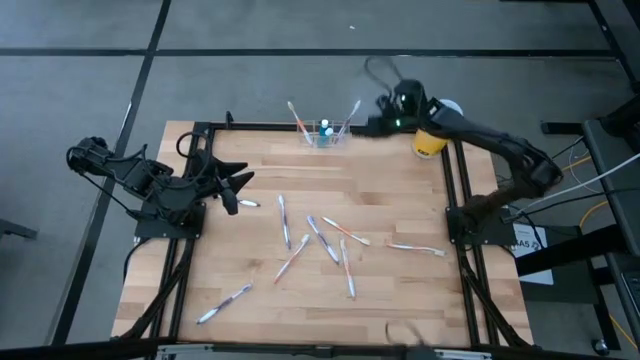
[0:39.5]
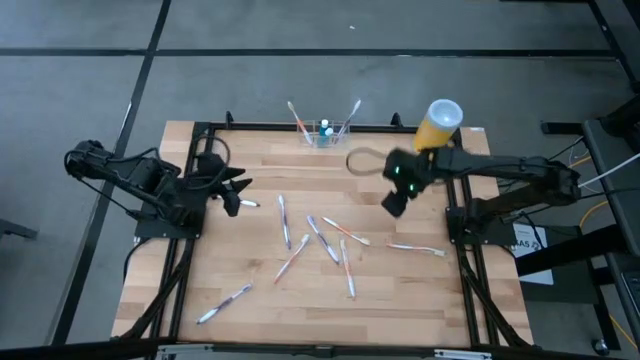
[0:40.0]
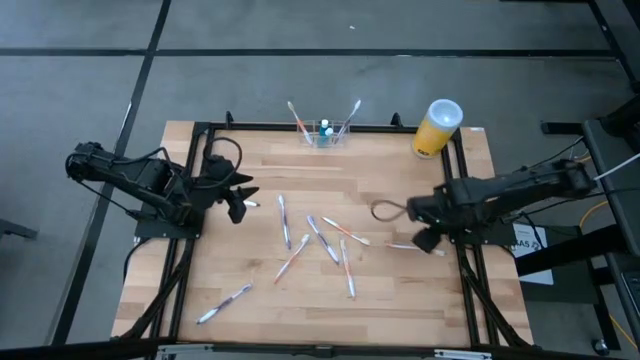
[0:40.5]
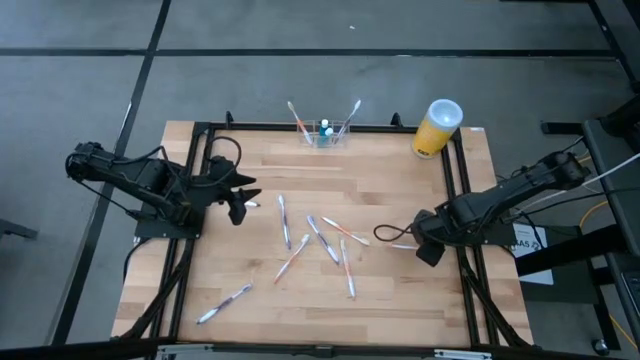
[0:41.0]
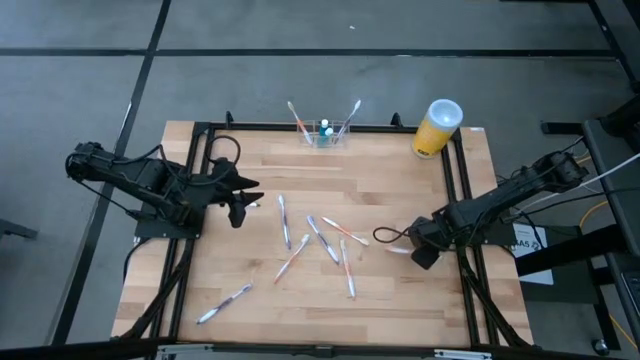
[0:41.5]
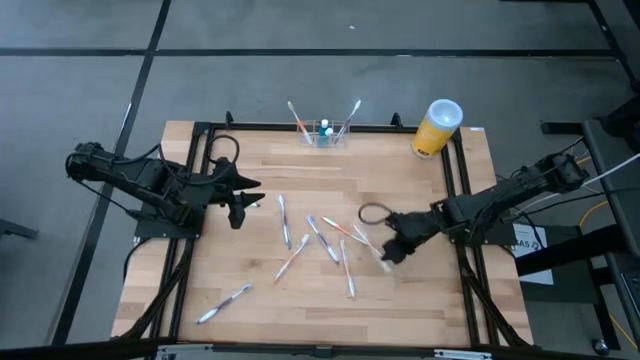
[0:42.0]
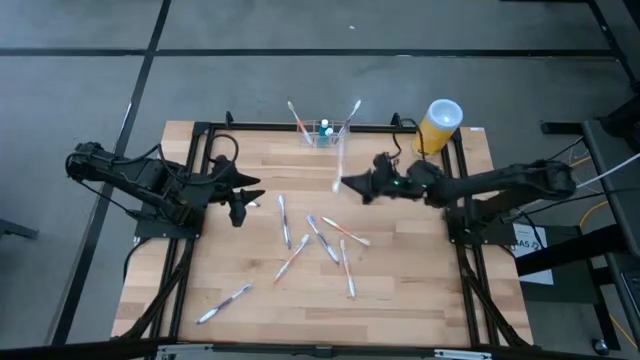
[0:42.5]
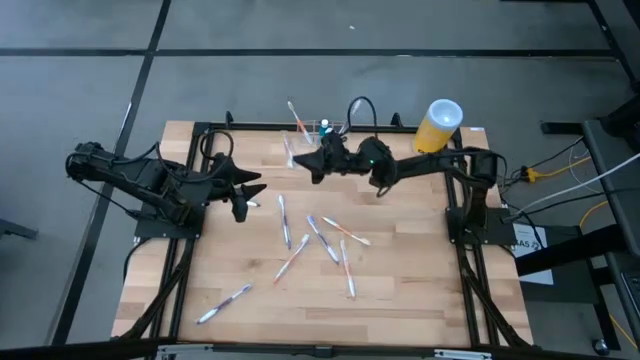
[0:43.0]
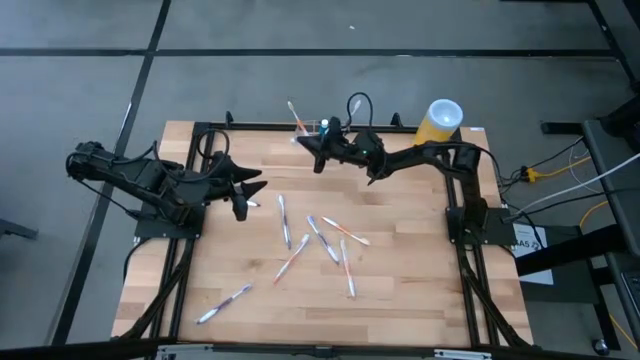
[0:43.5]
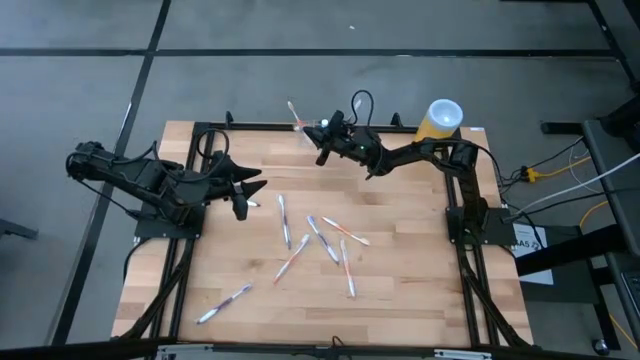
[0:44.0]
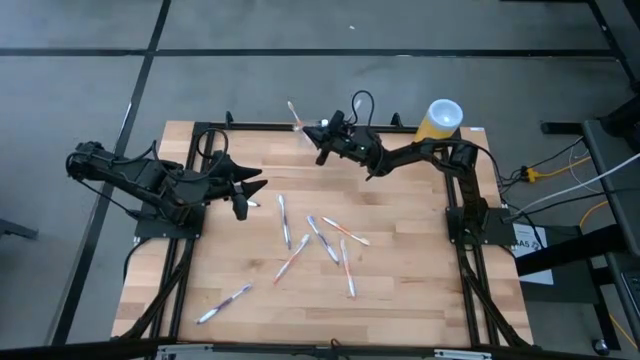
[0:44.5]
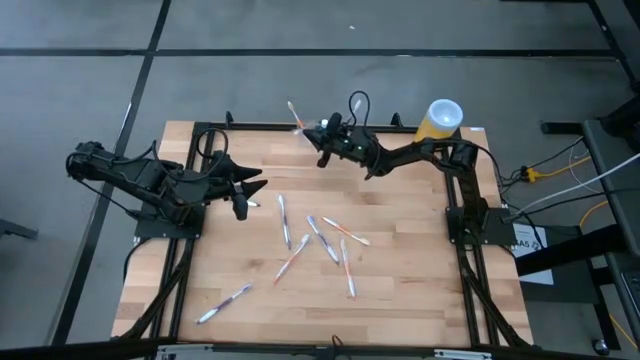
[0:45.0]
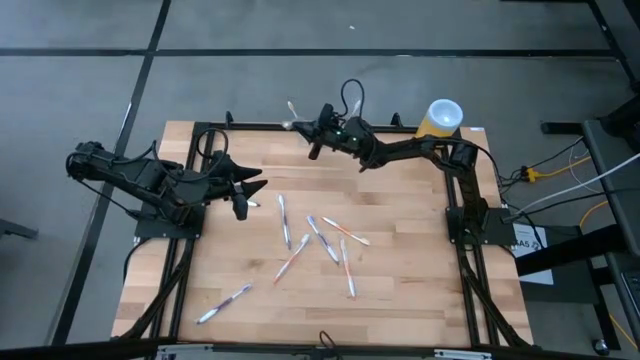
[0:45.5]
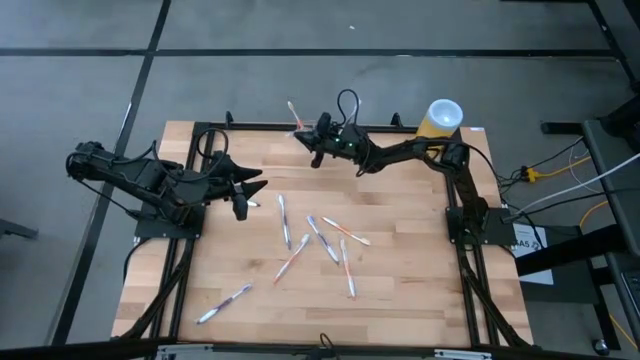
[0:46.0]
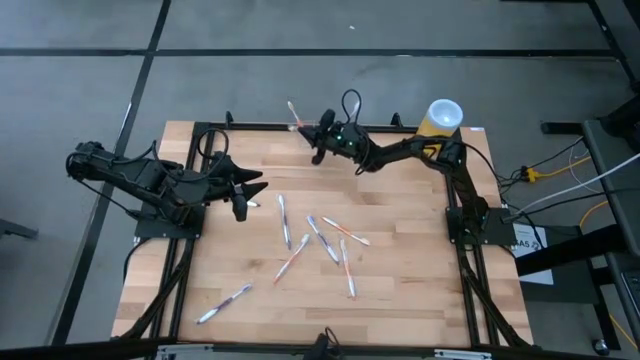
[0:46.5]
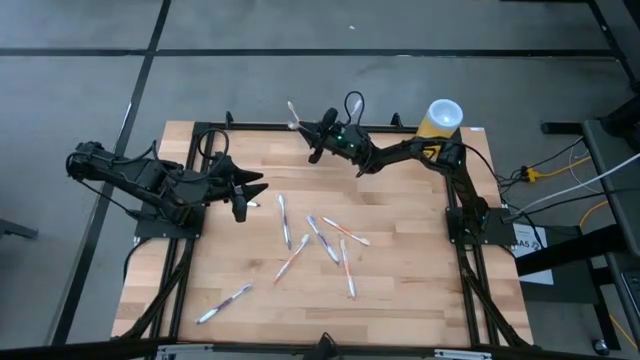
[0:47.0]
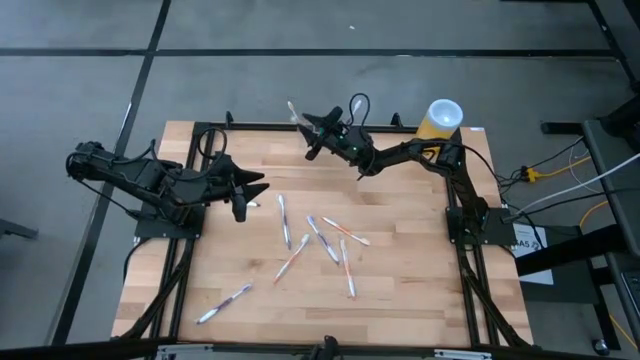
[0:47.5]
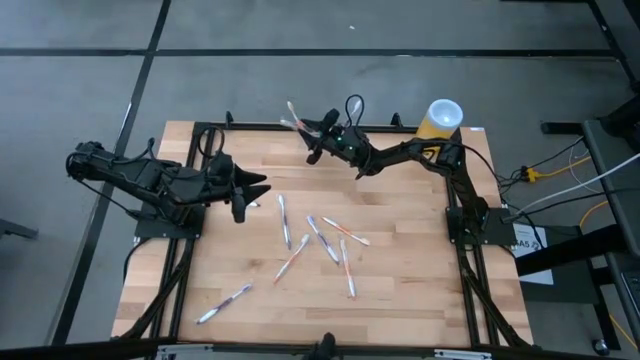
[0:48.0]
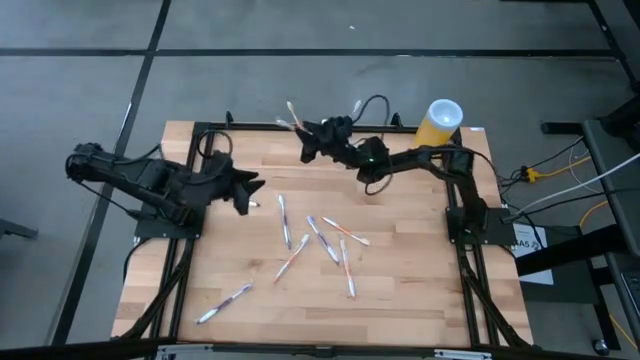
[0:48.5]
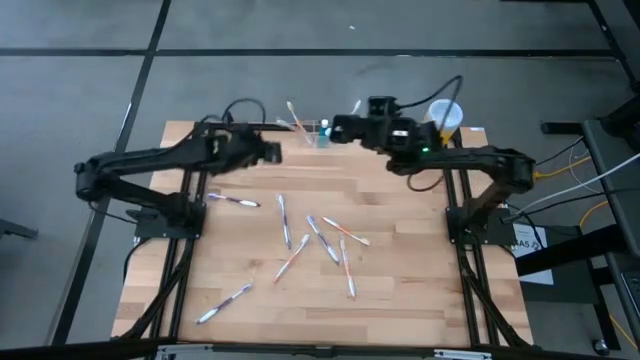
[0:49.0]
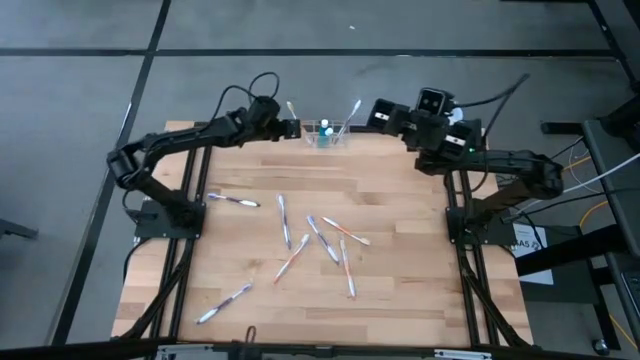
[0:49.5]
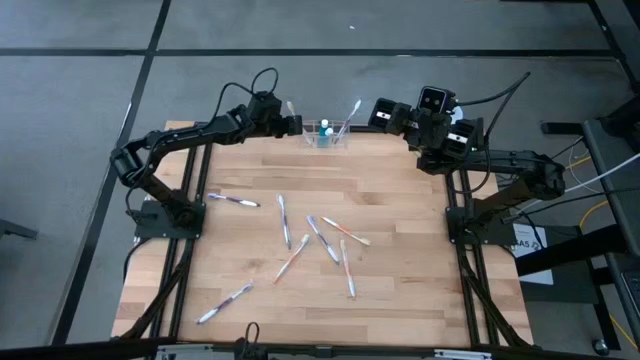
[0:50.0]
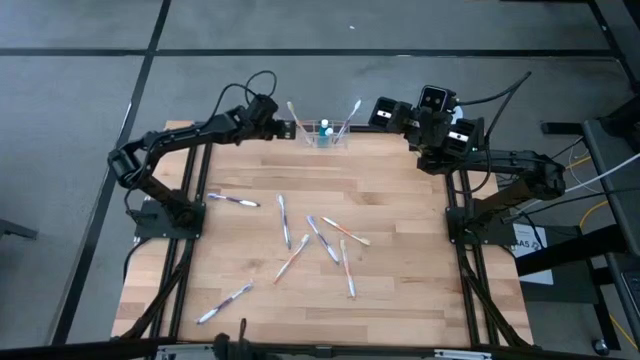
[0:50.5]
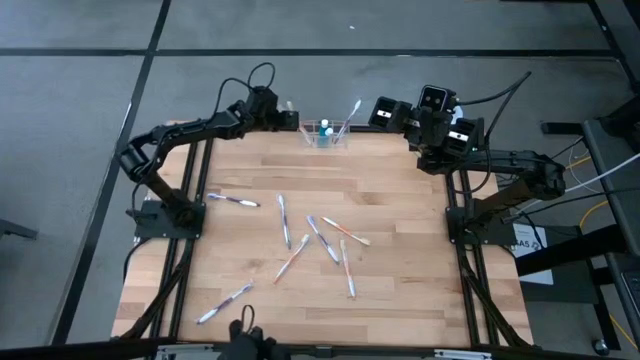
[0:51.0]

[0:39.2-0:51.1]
Task: Pick & Place toothbrushing station
Put the orange toothbrush into the transparent organizer

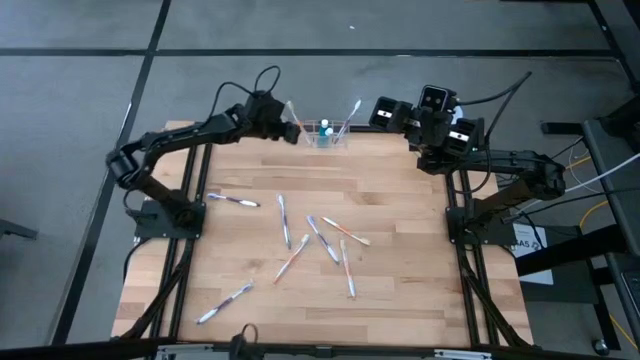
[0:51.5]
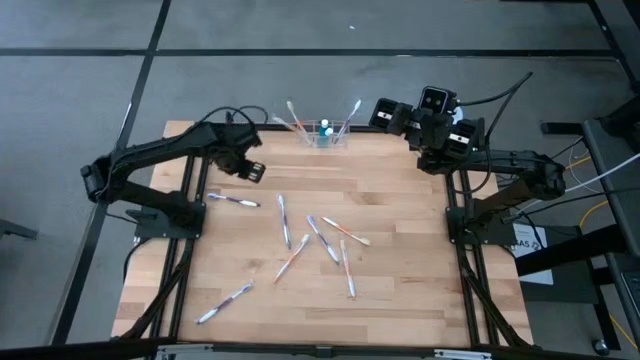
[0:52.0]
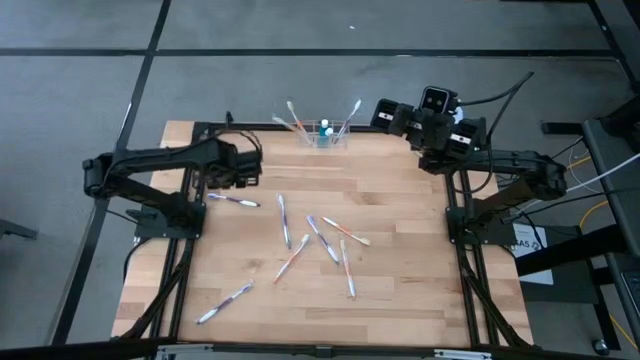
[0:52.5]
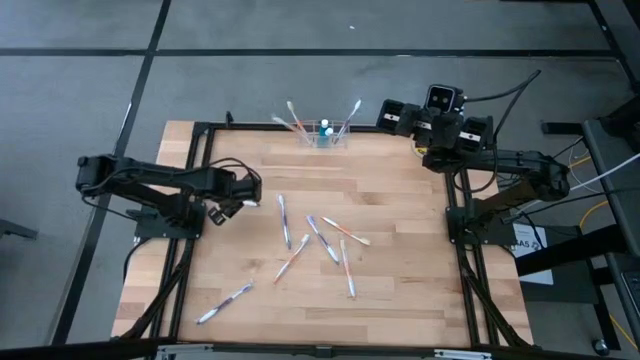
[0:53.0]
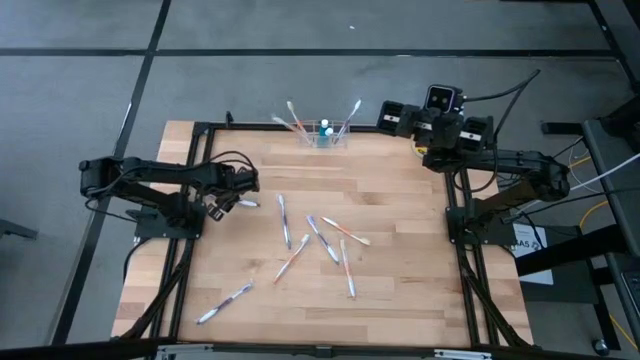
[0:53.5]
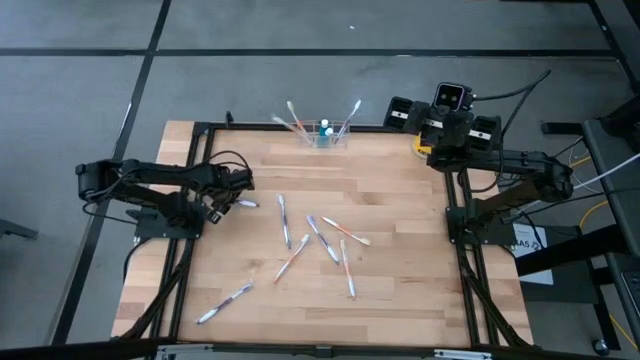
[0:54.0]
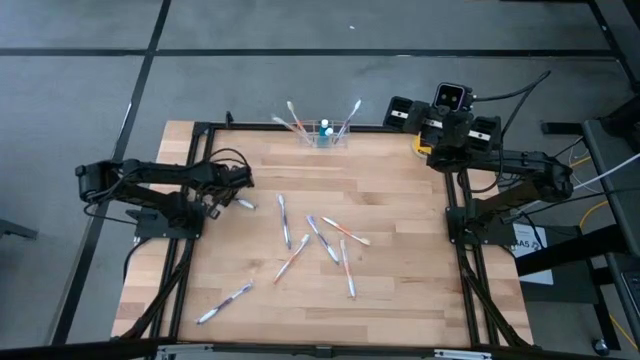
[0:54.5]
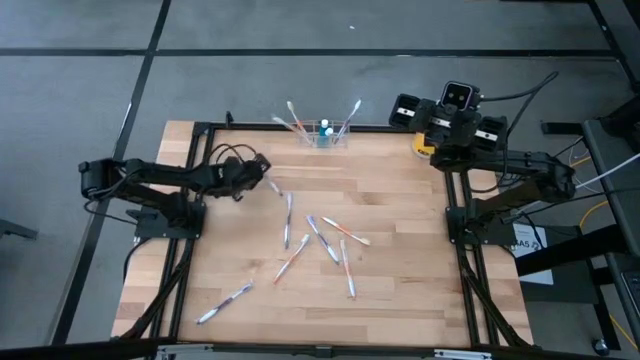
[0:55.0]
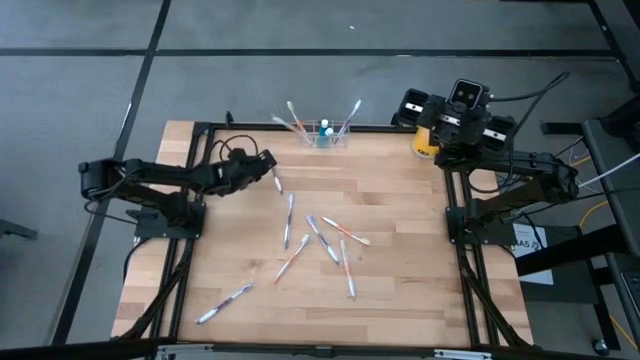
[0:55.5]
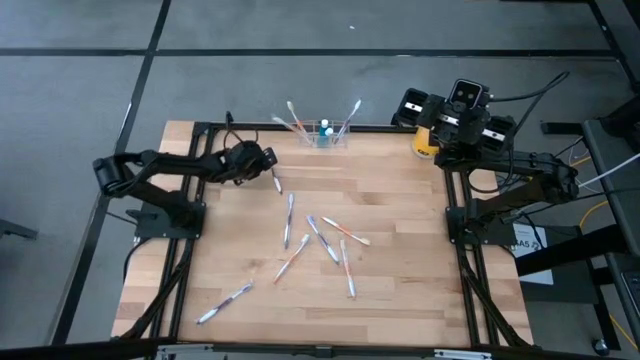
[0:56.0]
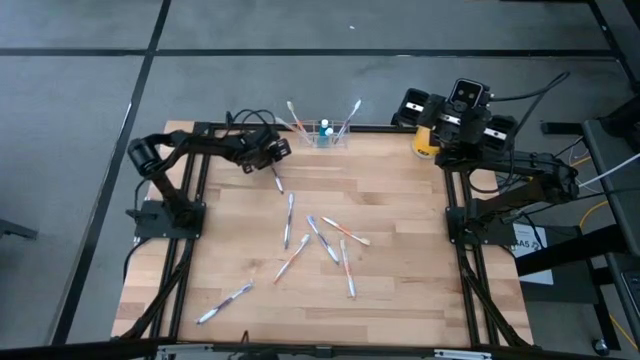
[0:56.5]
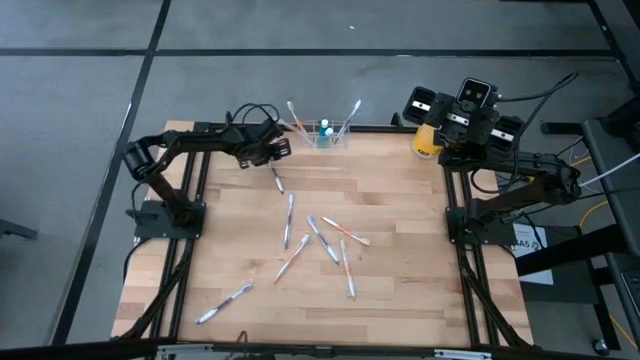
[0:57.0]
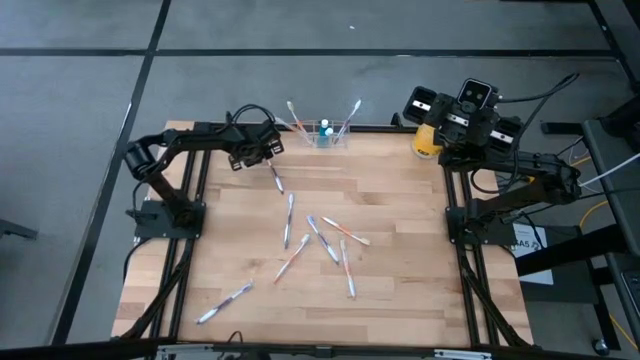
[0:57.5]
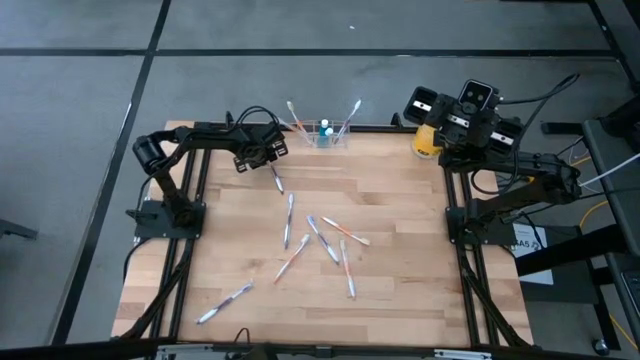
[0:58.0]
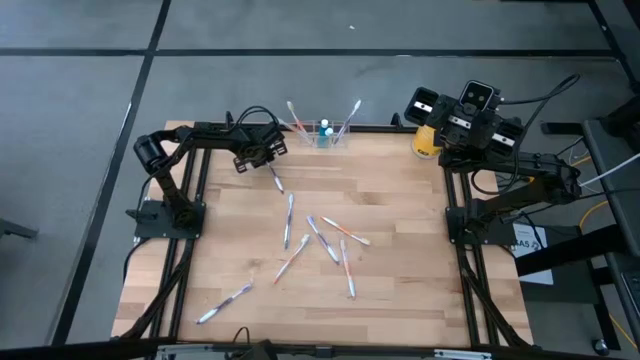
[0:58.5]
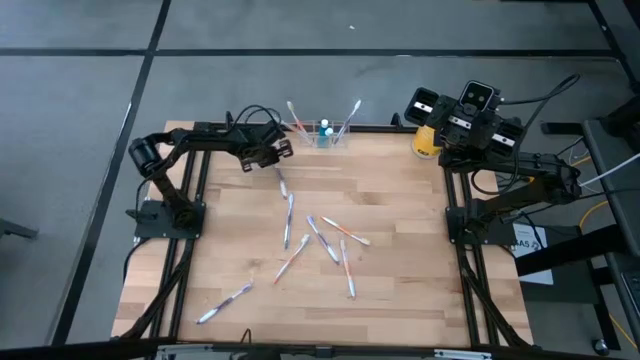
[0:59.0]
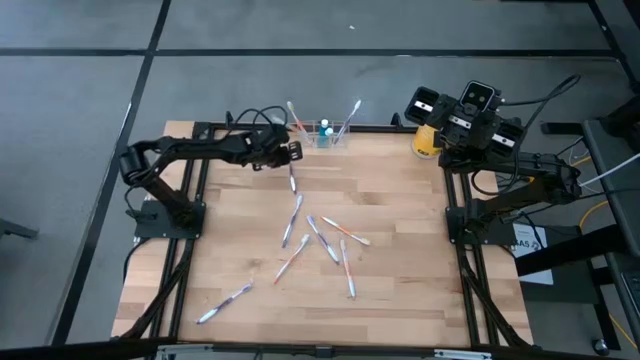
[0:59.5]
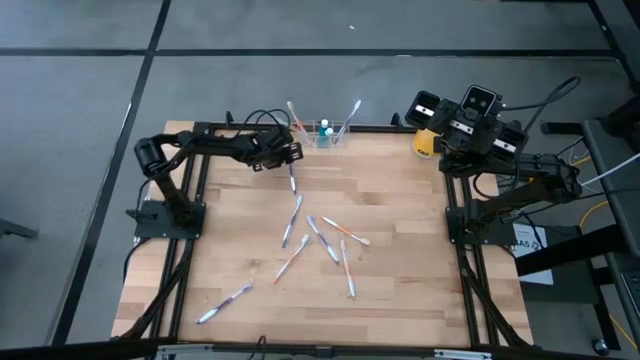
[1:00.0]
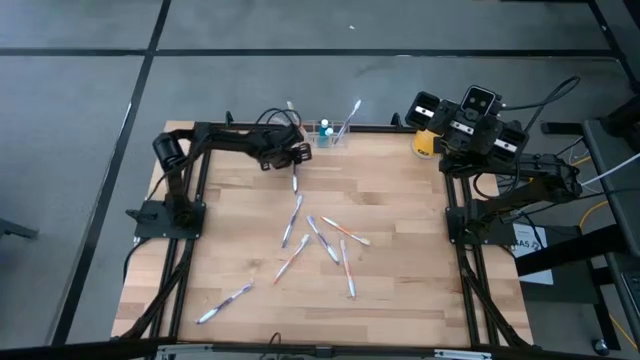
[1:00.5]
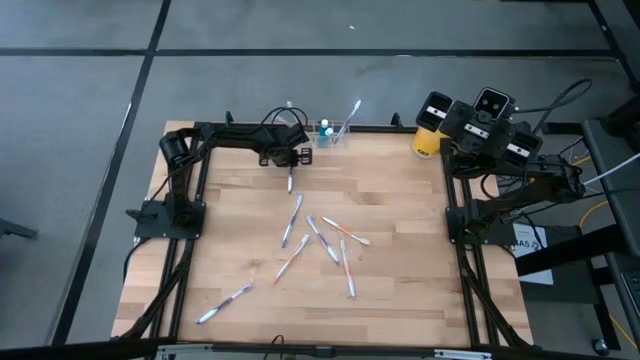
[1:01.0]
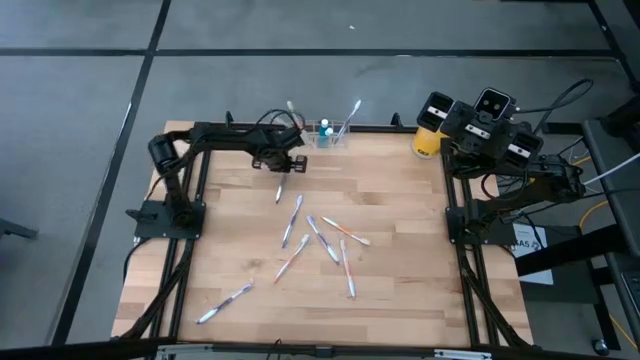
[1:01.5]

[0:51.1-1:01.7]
Put the purple toothbrush into the transparent organizer
